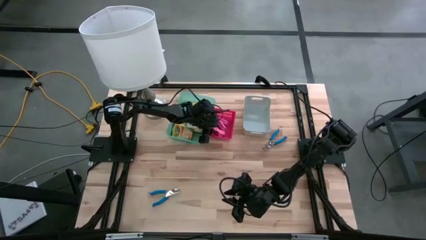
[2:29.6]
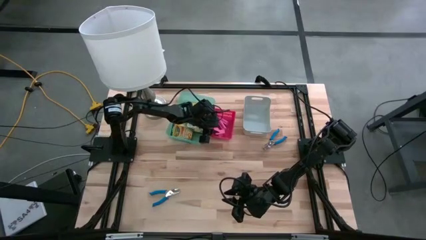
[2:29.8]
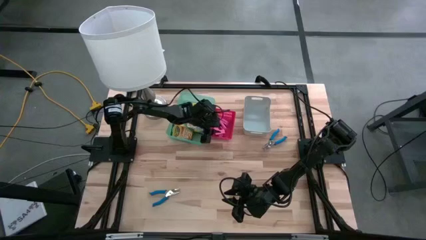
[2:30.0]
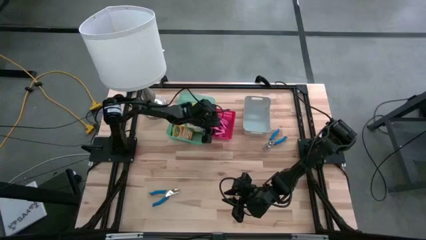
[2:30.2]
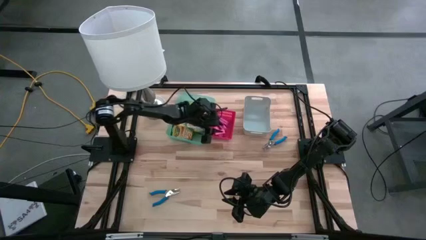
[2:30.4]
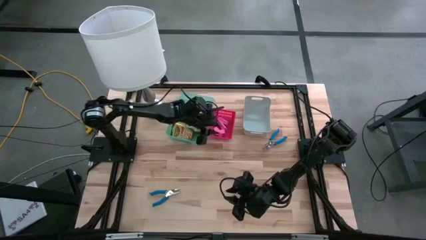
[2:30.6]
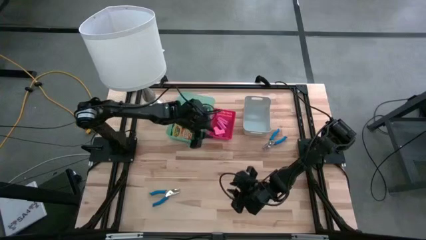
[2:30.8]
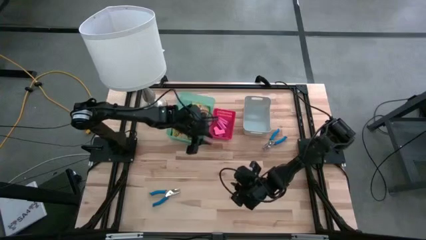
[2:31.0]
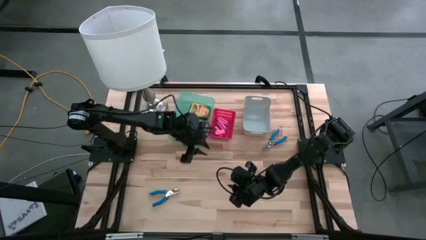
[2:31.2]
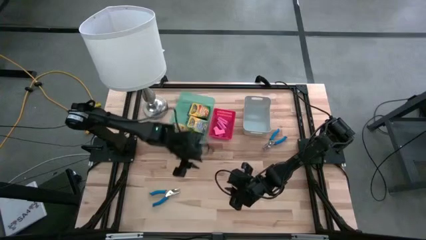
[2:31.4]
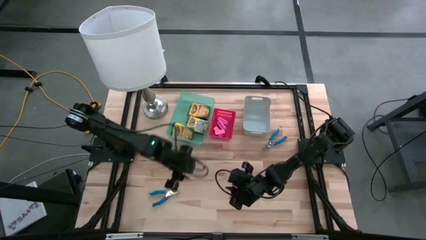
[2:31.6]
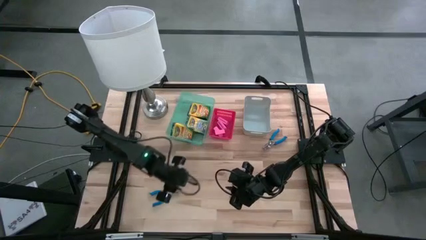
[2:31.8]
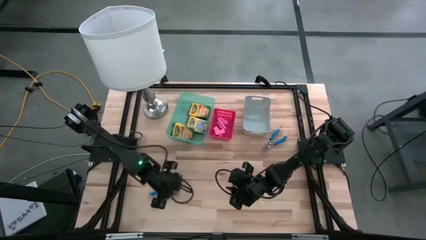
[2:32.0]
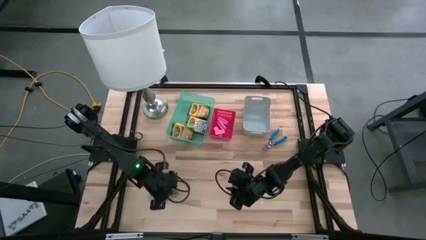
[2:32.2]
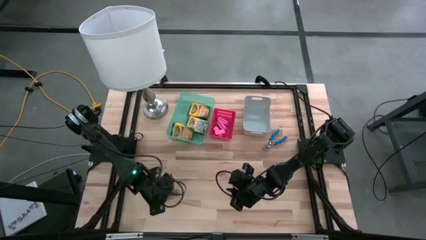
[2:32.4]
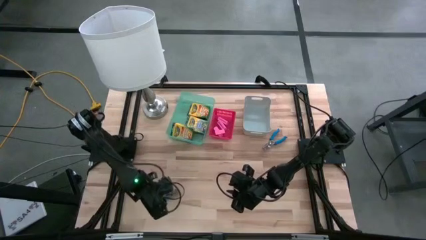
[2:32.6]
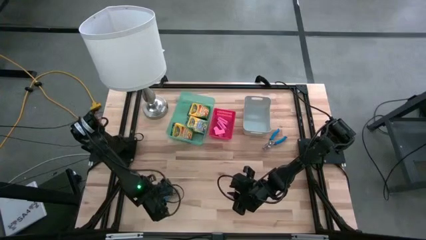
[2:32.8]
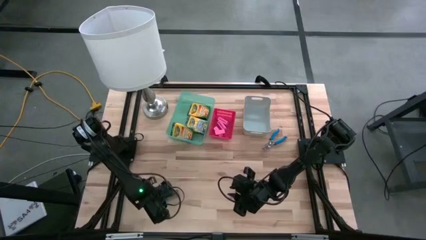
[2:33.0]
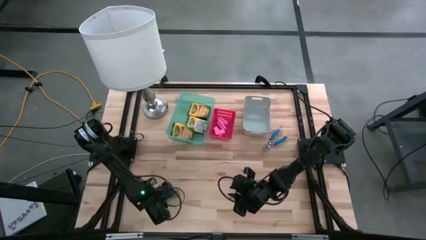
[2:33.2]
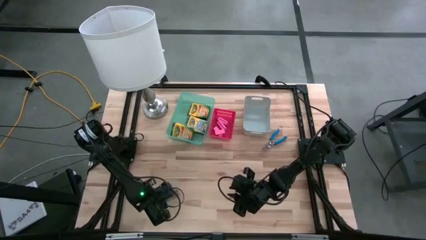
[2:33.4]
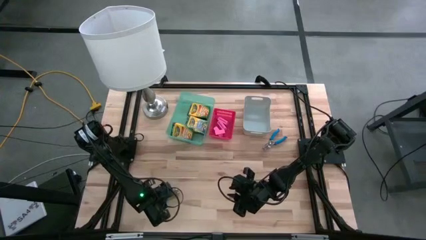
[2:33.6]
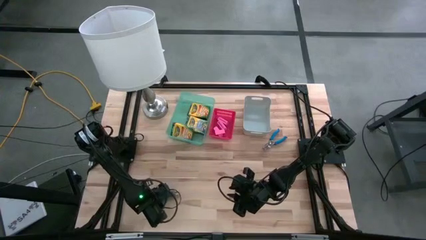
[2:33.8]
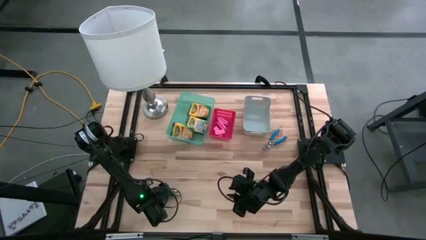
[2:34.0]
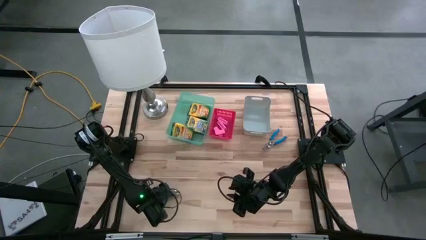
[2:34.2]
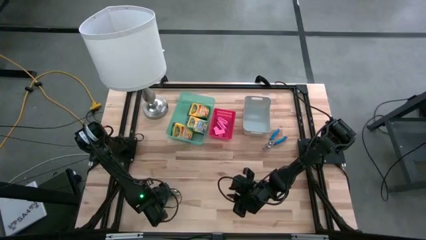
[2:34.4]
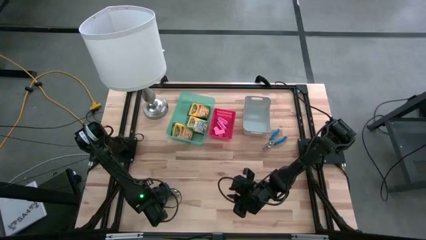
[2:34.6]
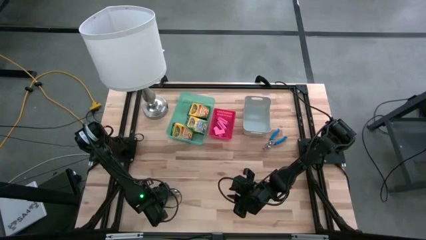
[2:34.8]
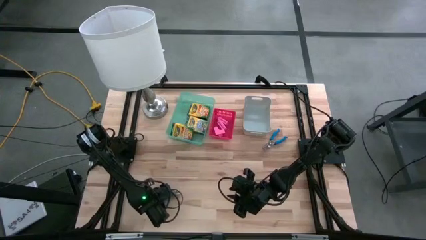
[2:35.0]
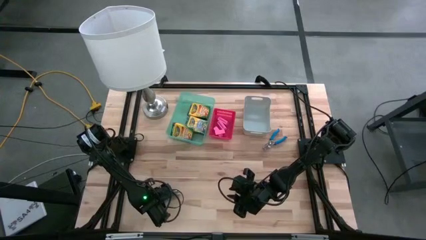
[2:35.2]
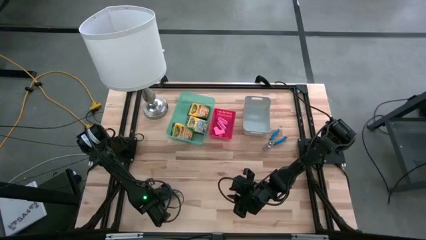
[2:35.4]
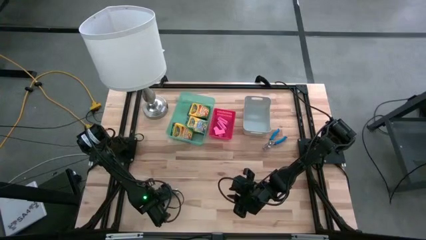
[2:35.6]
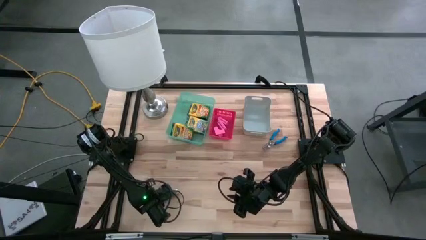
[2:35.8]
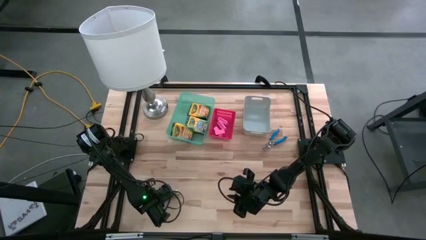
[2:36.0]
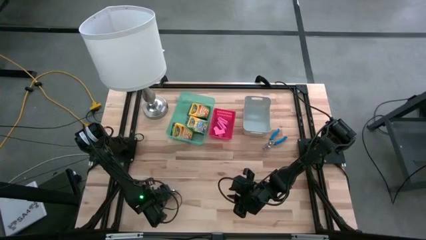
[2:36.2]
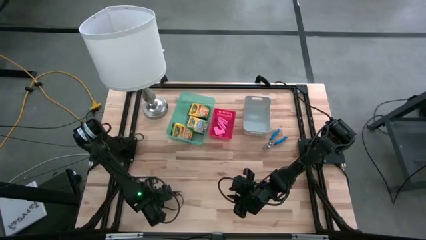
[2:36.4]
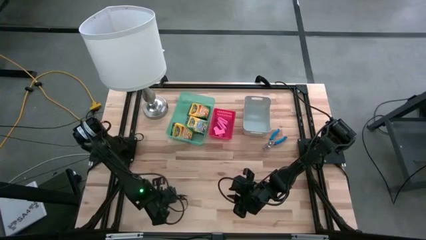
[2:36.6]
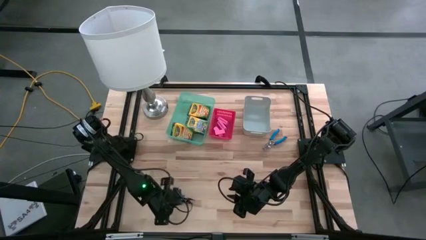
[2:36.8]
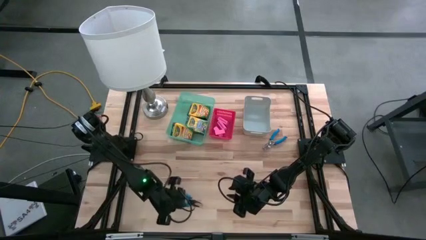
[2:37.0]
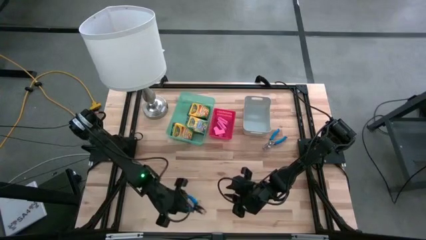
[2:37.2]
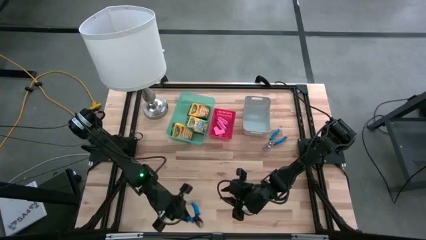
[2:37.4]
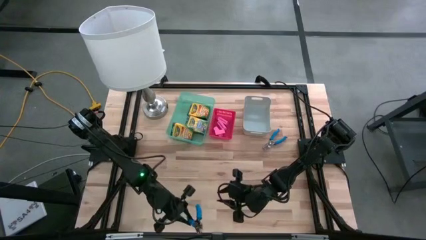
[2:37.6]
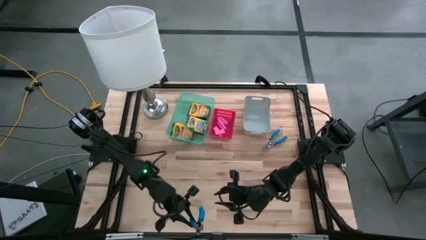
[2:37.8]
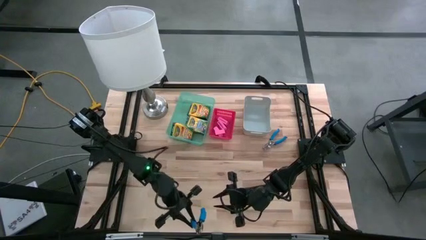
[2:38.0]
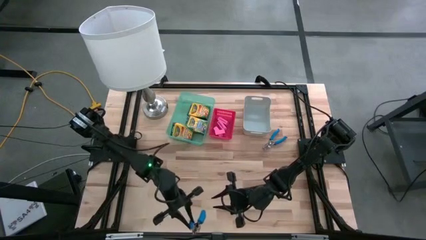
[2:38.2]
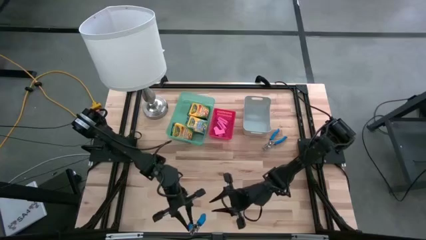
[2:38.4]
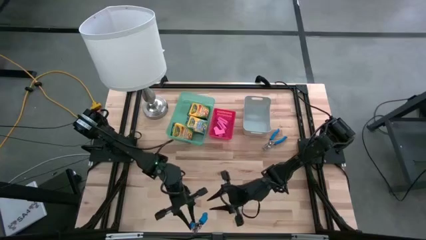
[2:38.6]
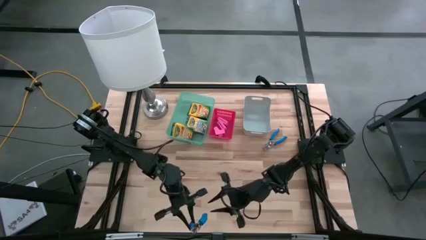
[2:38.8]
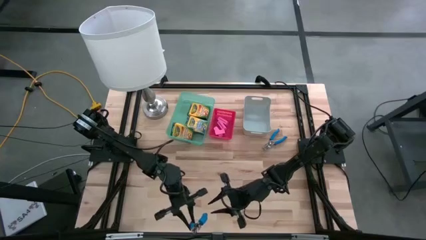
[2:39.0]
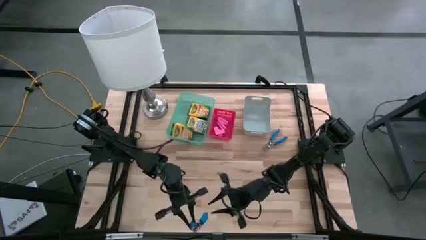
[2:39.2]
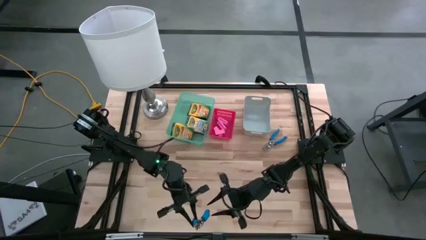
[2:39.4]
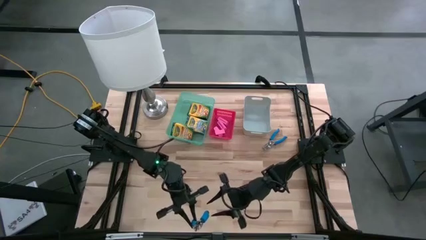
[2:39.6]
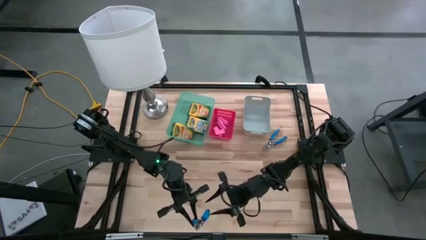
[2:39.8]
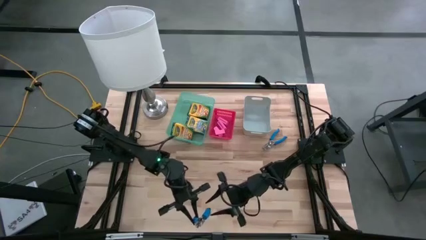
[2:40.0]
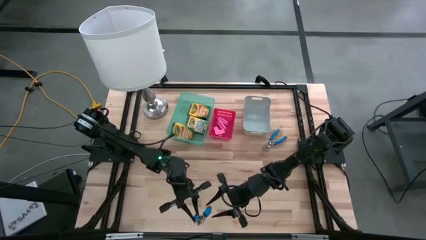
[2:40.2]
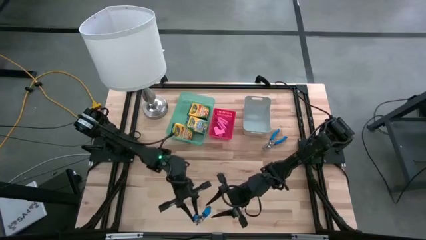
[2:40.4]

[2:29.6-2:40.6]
Task: Pick & Place School Supplies
Put the blue puncher into the gray bin

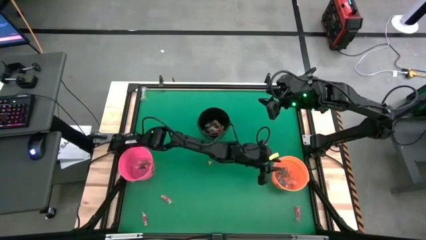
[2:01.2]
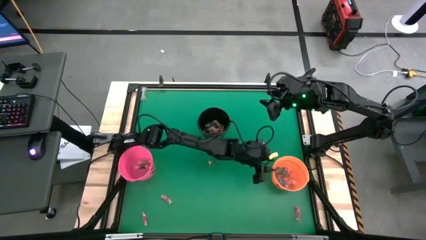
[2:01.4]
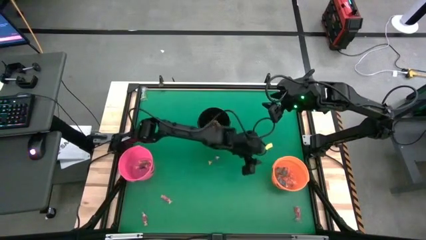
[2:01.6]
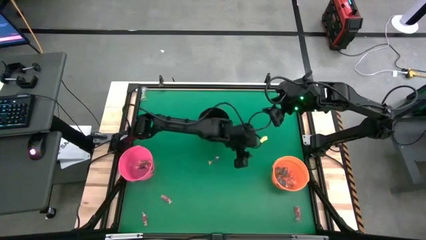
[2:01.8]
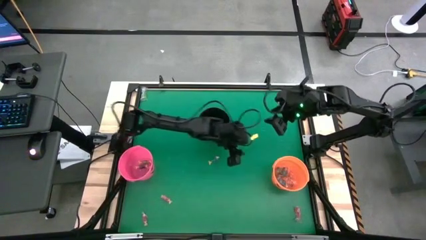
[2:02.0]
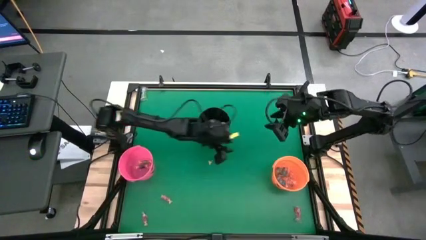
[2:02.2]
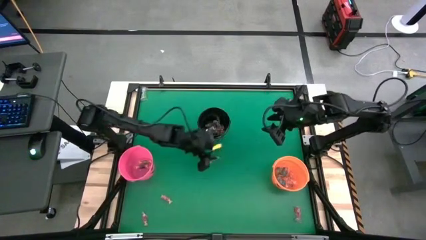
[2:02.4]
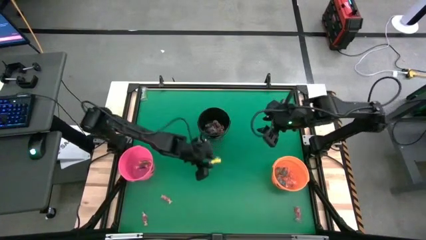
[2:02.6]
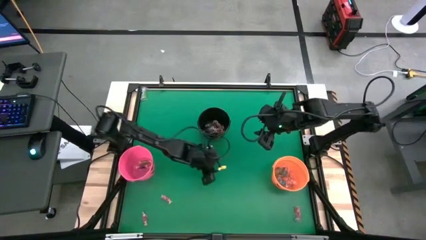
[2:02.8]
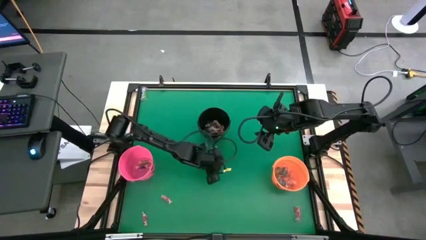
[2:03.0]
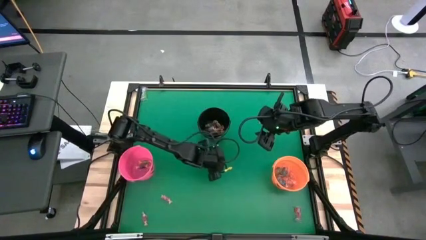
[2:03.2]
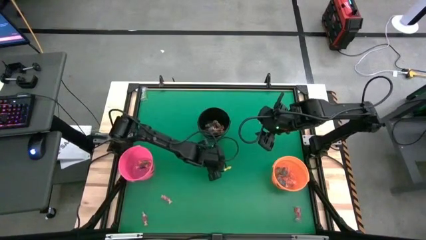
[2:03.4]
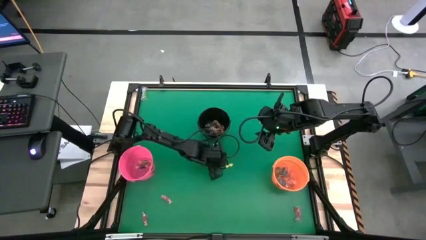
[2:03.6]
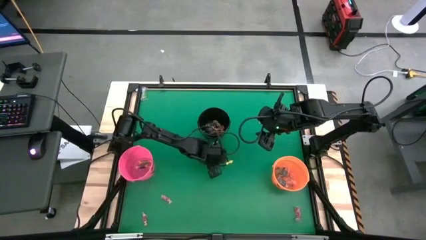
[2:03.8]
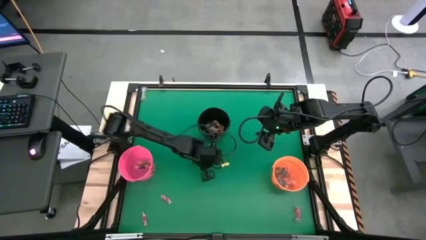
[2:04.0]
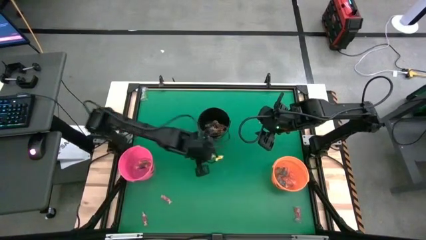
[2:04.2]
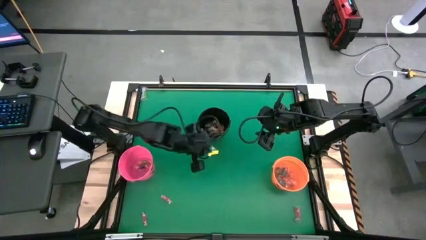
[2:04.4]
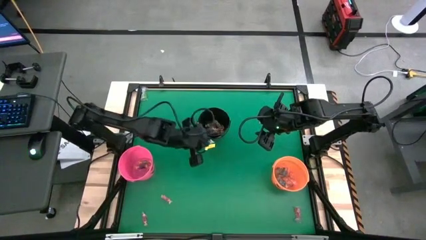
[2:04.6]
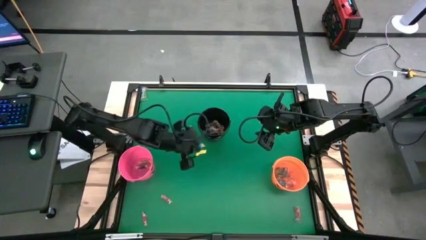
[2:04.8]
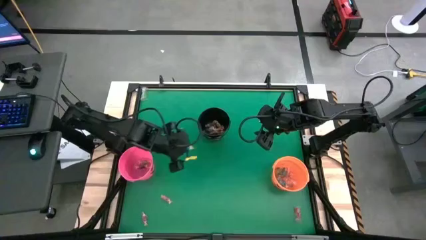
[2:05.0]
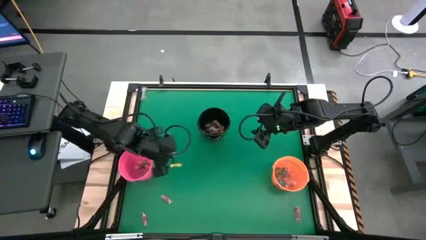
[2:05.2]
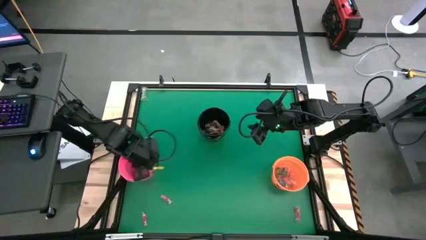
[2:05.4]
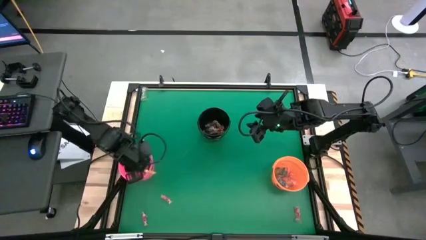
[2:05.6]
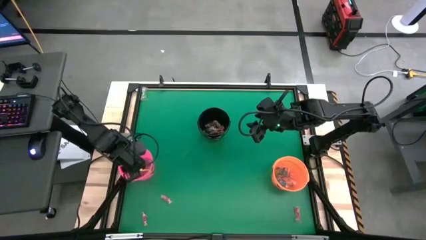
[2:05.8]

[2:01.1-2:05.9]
Task: Sort candy by brand, put in halloween buckets
Put the blue candy into the pink bucket

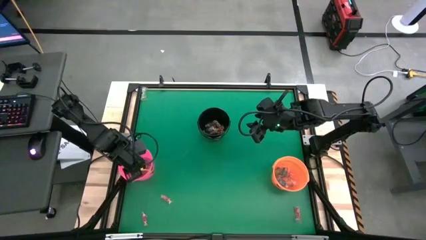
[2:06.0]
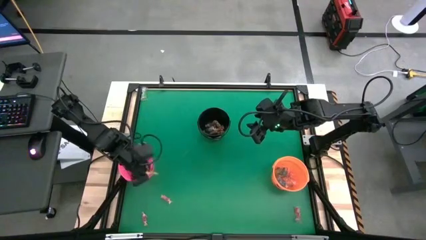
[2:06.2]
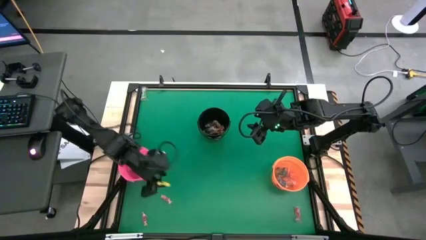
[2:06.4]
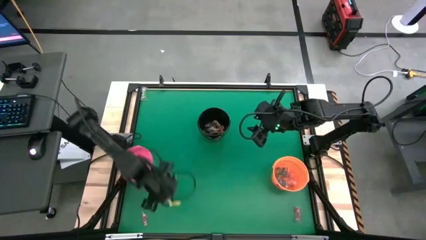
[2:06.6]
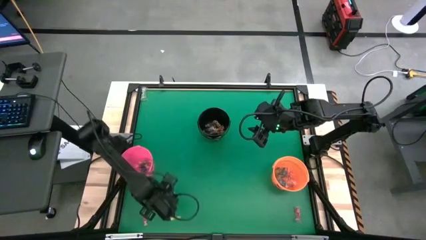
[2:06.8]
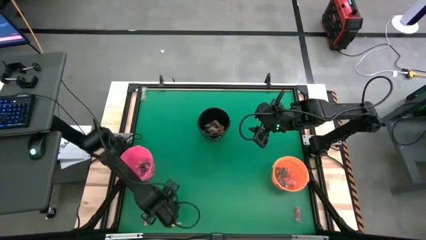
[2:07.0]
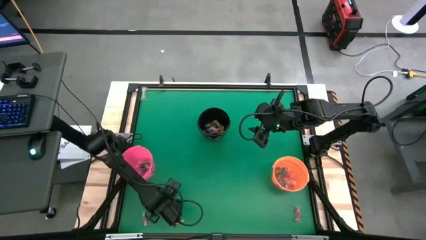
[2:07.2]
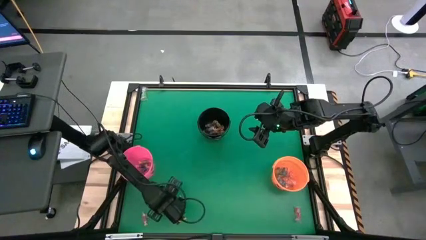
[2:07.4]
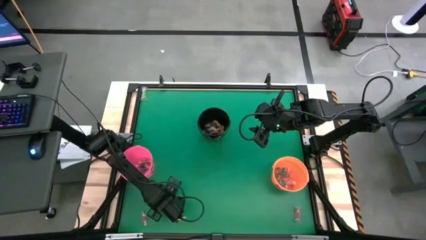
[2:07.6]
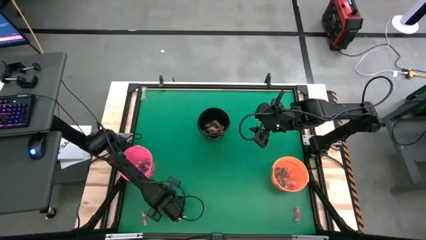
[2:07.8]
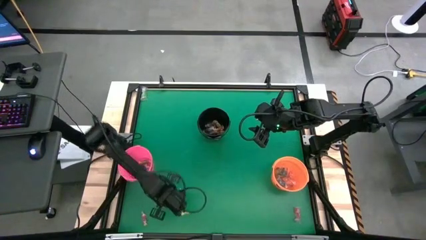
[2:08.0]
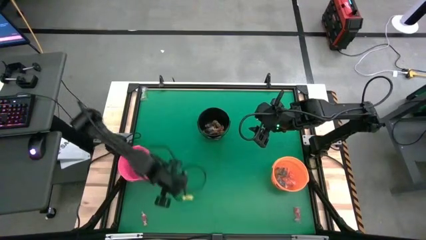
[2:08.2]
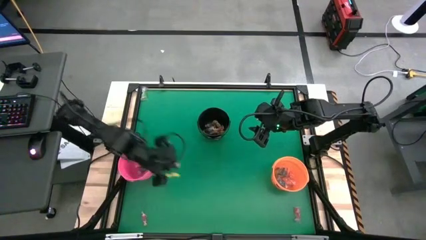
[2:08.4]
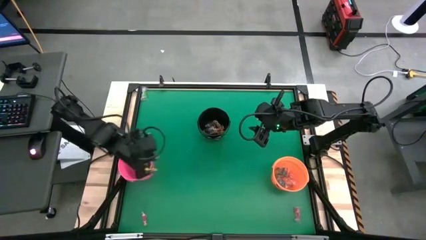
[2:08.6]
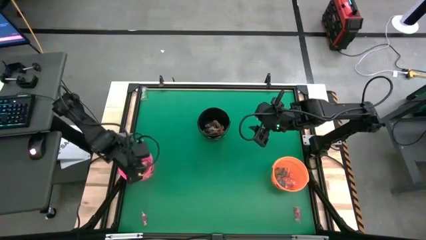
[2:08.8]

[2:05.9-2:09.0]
Put the red candy into the pink bucket
